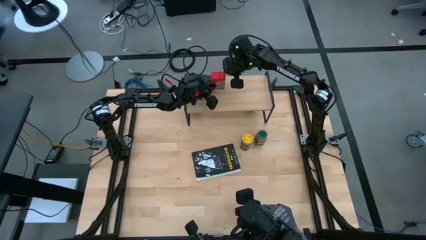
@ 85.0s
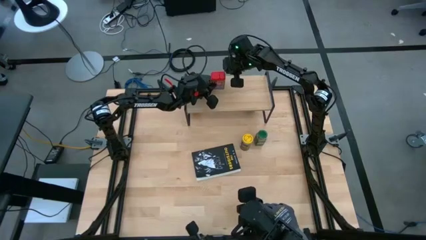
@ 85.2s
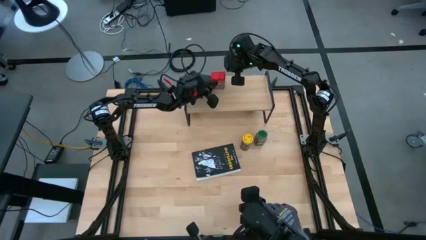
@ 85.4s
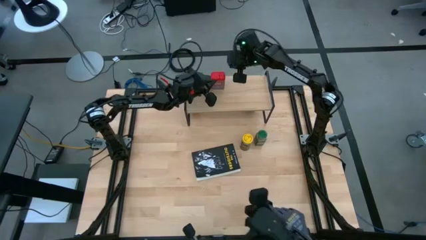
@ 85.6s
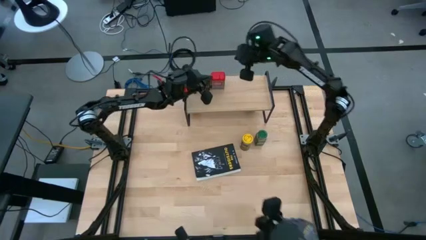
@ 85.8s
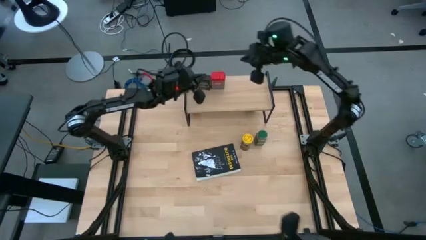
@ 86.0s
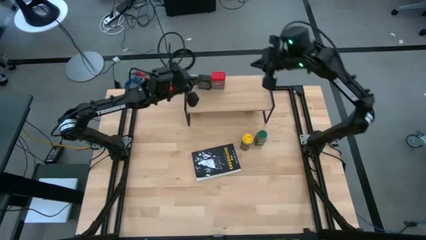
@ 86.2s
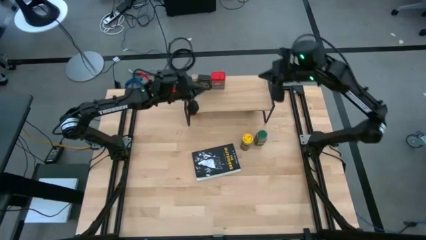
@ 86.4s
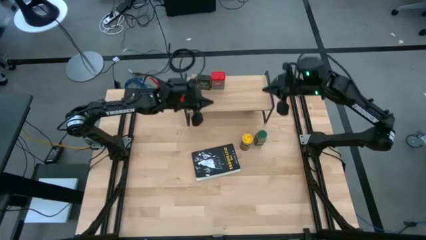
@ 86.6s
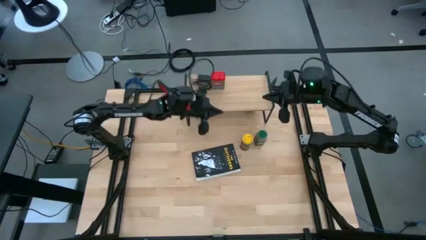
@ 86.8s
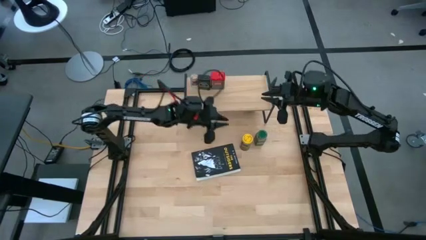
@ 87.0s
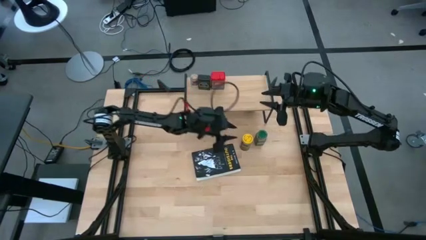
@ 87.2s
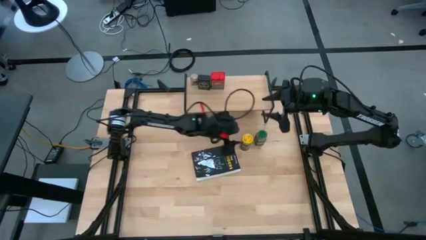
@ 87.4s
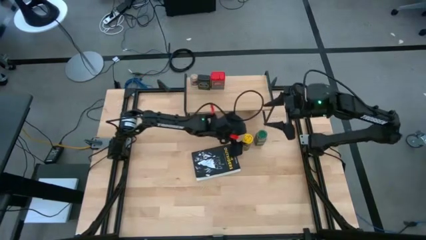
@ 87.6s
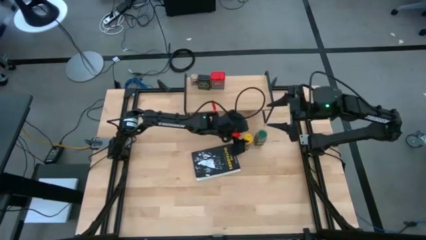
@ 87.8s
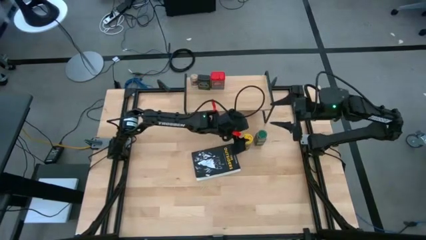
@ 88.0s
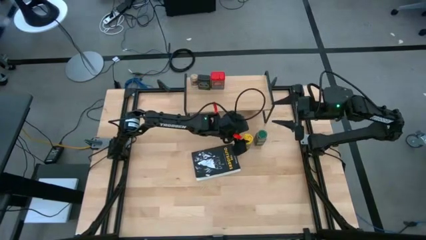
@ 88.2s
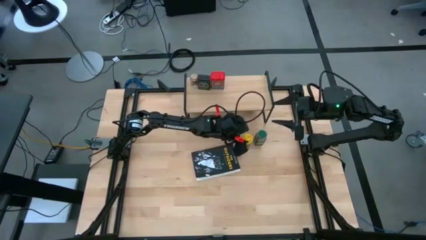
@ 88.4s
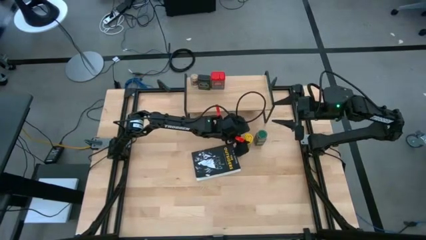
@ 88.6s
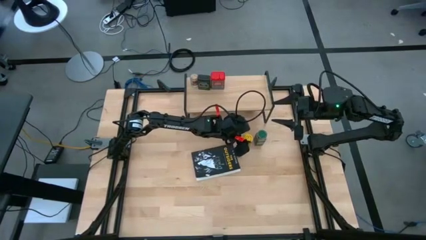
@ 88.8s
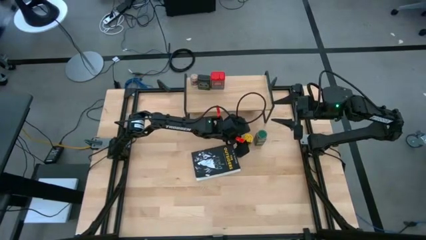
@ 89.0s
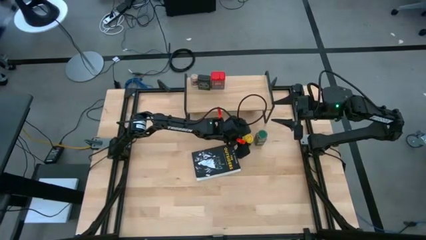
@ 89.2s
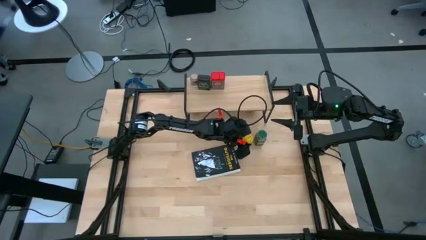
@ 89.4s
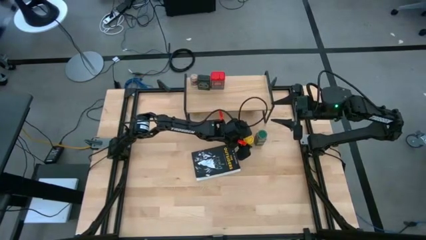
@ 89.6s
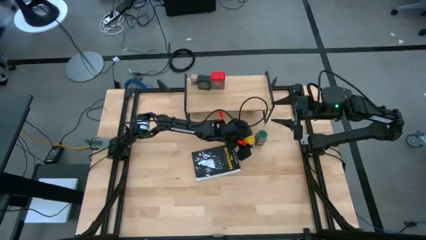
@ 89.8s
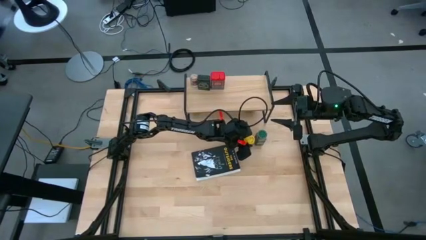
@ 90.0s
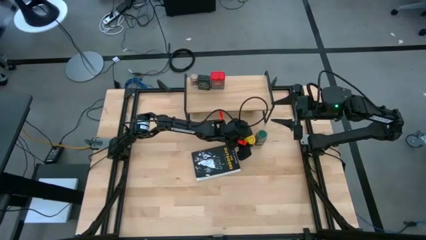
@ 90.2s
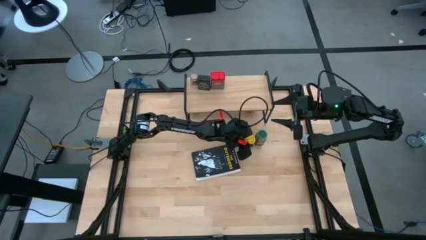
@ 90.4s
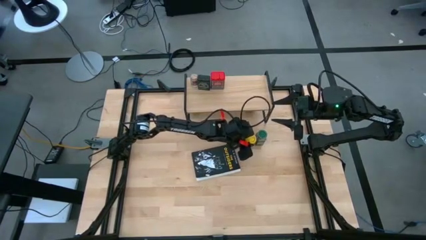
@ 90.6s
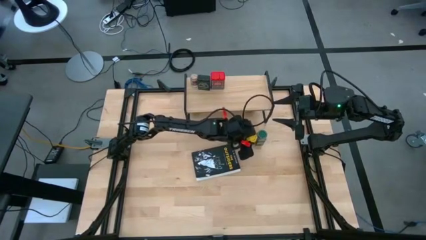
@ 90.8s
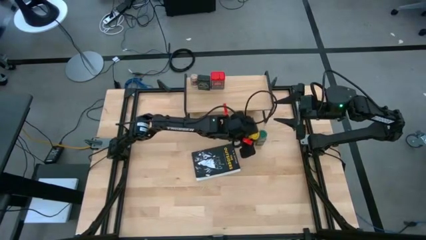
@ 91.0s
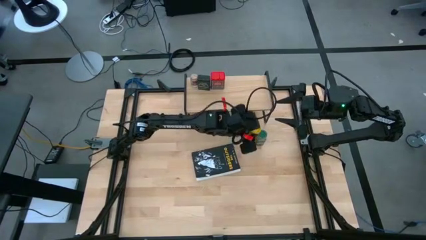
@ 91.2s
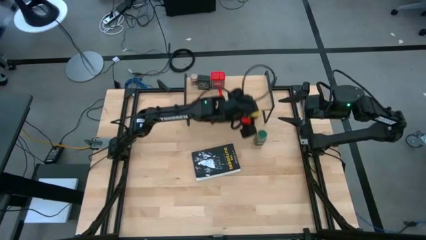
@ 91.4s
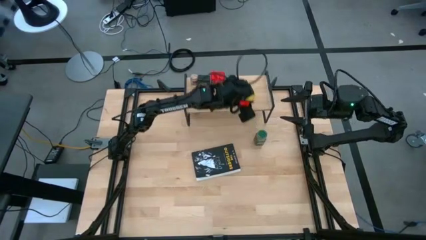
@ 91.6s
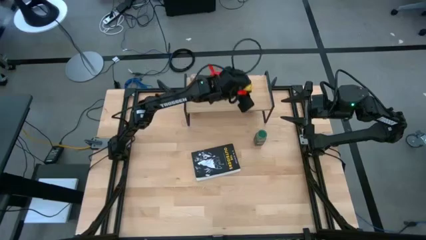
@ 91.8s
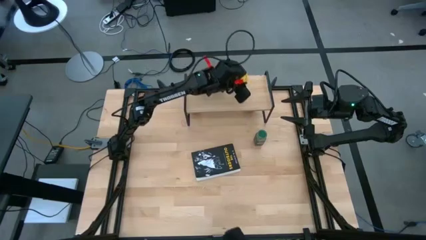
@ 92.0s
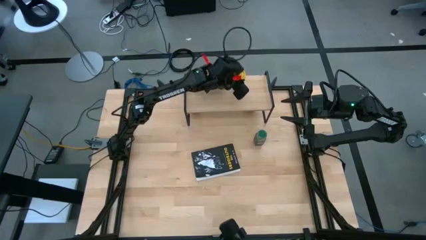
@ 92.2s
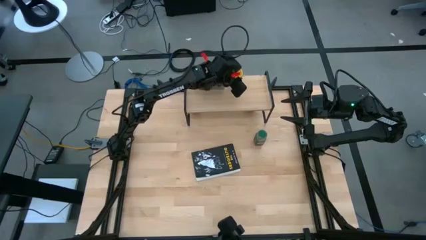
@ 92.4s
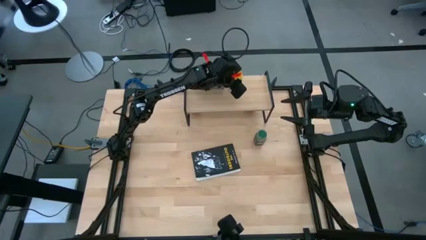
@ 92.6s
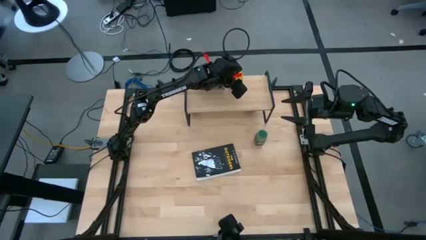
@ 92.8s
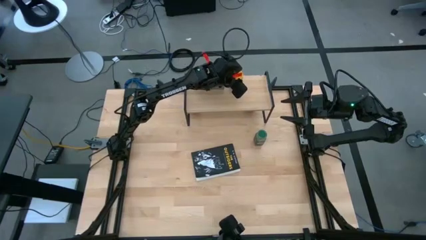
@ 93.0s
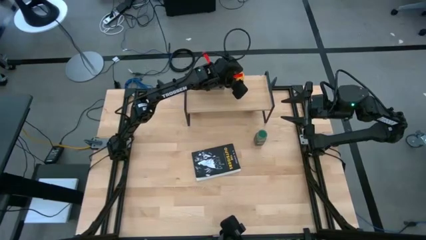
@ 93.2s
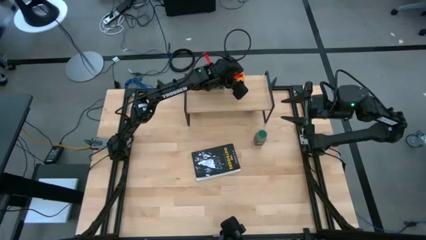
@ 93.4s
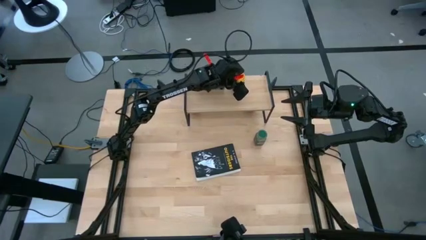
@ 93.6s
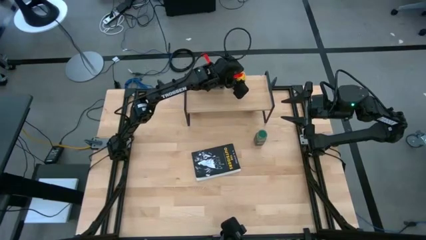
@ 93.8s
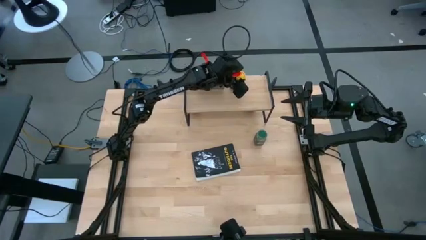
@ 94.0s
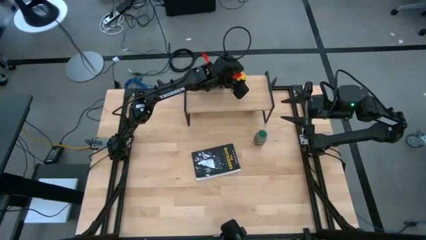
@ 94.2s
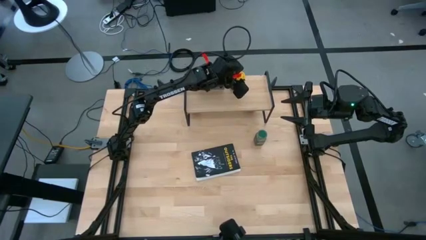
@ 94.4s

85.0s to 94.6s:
Task: Shelf spices
Put the yellow seasoning bottle on the shelf

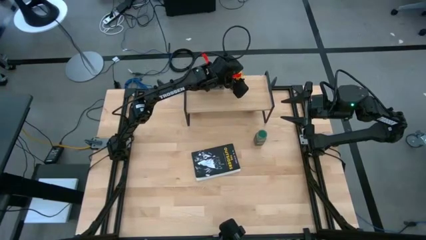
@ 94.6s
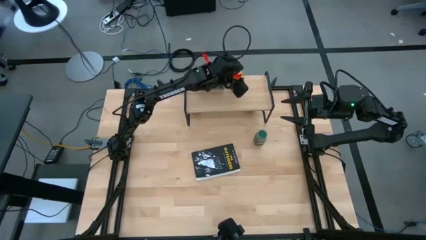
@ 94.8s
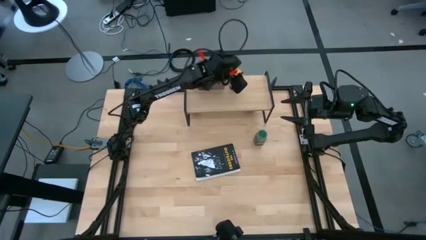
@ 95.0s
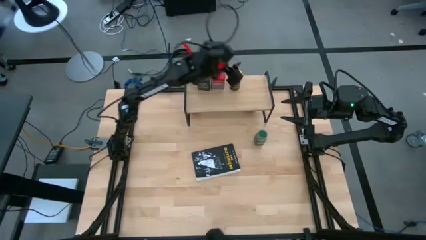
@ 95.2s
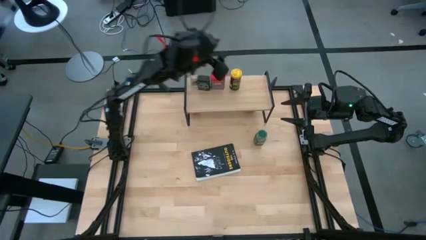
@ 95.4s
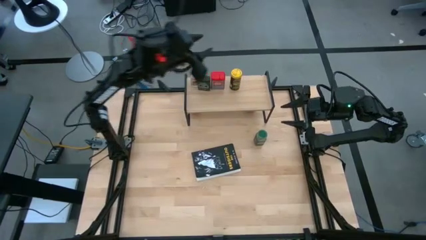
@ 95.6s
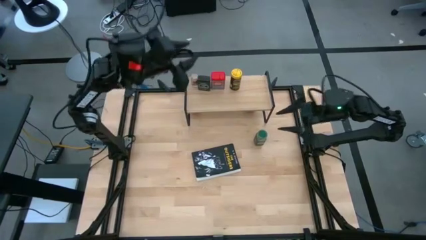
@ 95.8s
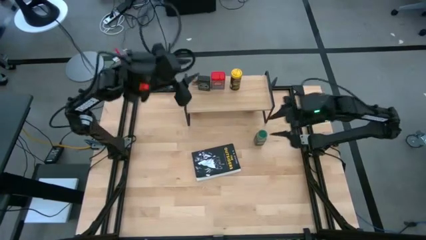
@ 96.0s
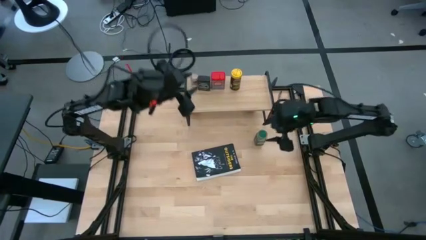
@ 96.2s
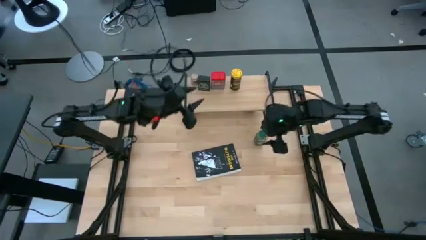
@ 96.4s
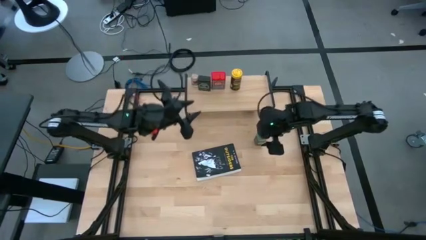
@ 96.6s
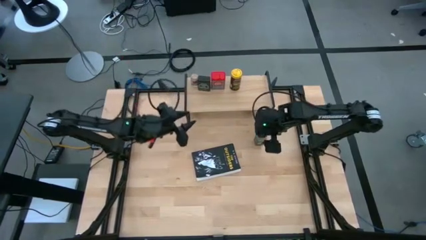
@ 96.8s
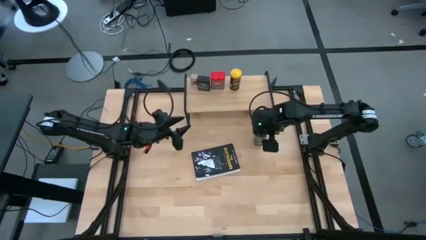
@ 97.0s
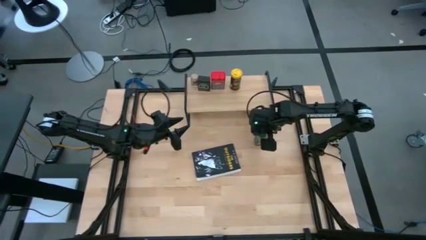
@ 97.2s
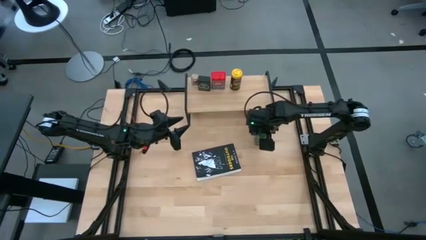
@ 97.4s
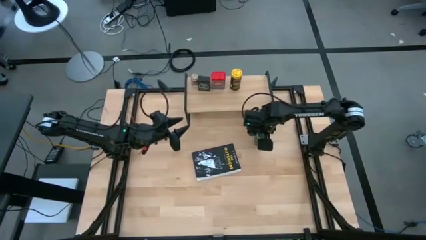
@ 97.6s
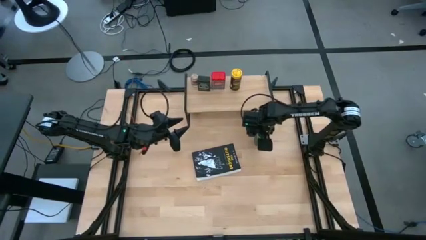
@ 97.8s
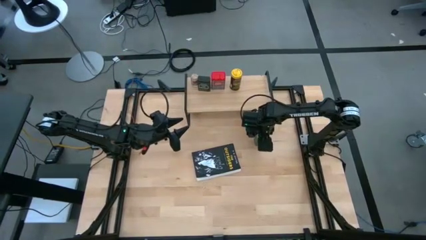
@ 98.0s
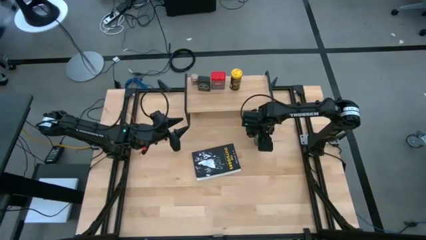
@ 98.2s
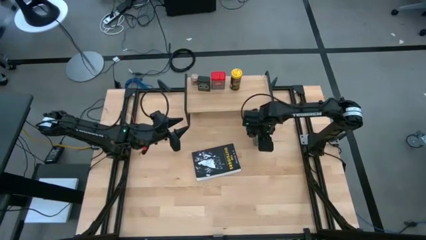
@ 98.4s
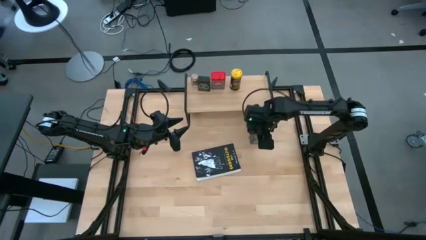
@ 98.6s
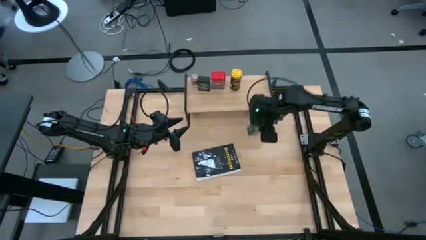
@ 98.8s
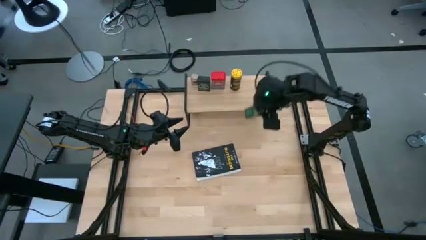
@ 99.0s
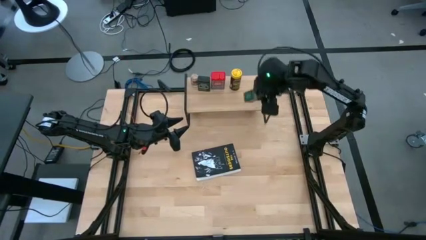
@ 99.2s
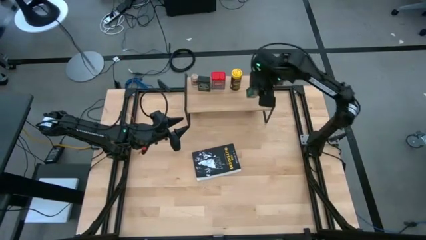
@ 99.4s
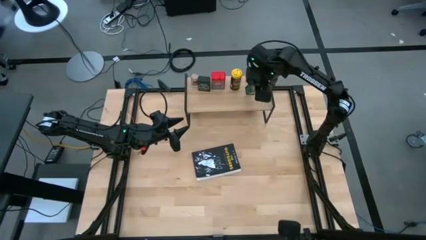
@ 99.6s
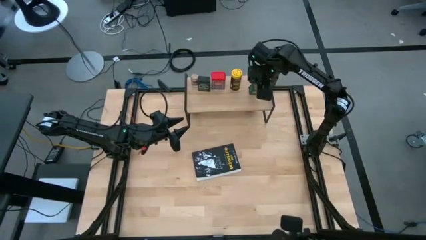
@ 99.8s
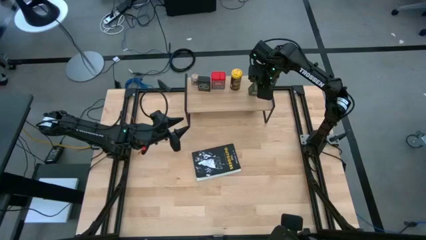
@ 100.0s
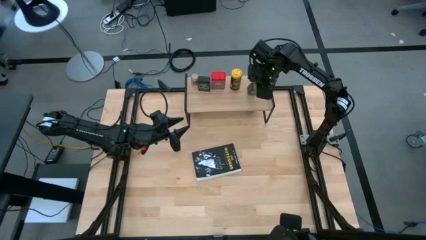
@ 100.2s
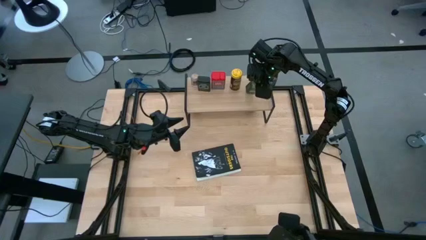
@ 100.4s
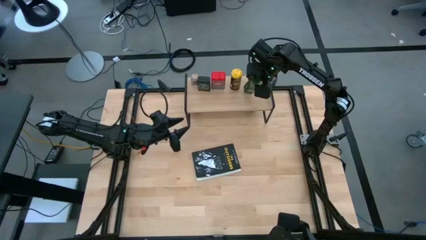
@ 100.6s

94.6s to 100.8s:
Put the green seasoning bottle on the shelf
